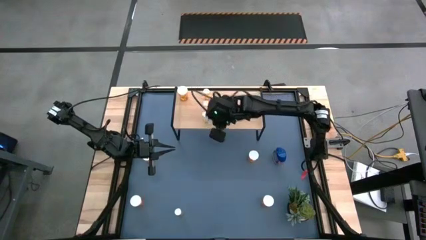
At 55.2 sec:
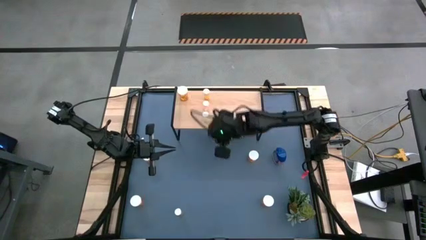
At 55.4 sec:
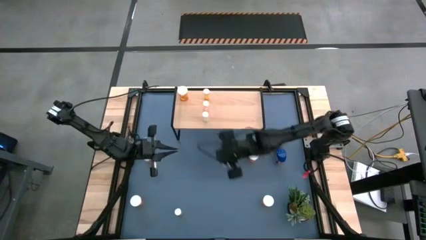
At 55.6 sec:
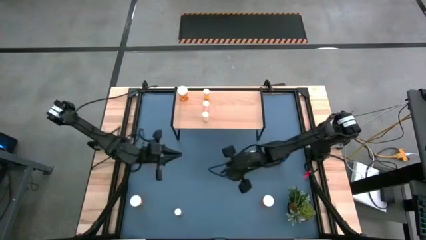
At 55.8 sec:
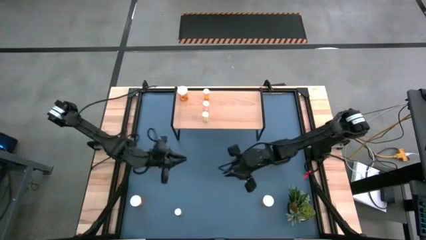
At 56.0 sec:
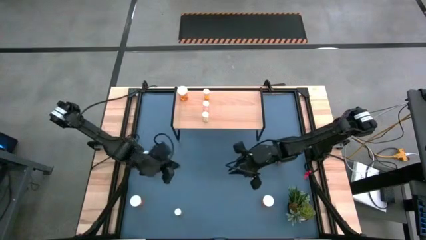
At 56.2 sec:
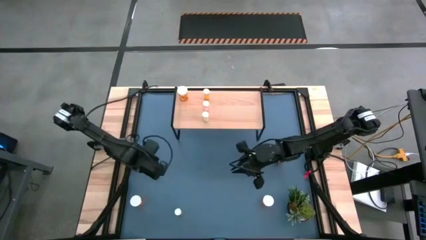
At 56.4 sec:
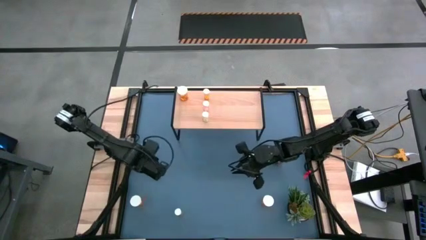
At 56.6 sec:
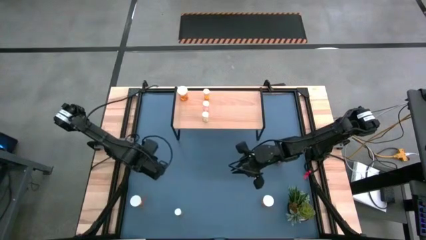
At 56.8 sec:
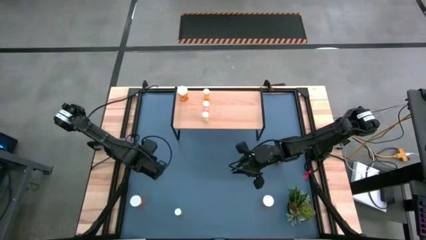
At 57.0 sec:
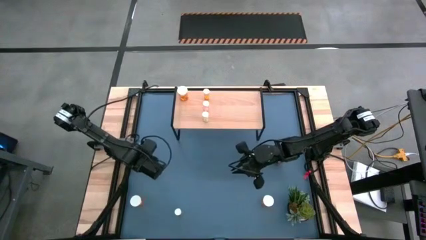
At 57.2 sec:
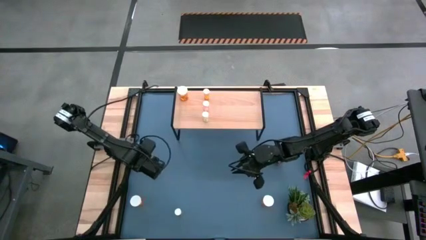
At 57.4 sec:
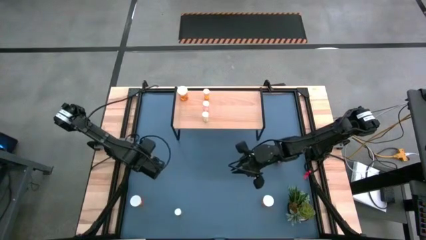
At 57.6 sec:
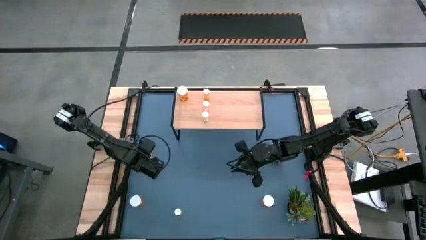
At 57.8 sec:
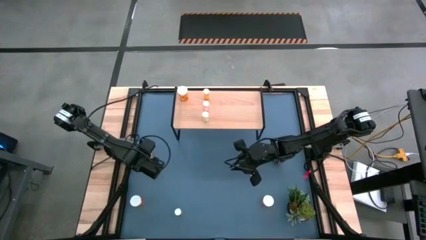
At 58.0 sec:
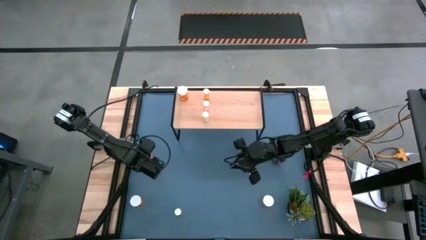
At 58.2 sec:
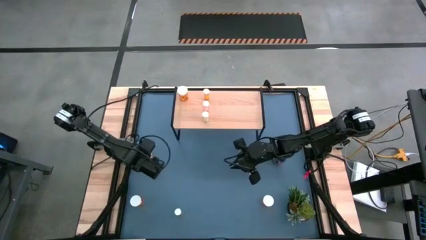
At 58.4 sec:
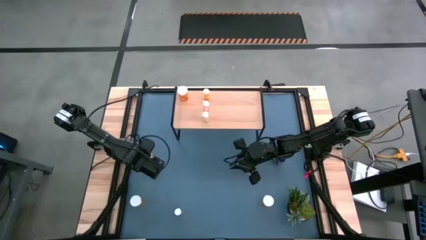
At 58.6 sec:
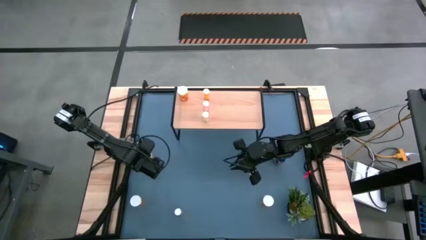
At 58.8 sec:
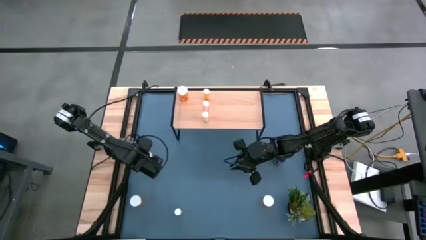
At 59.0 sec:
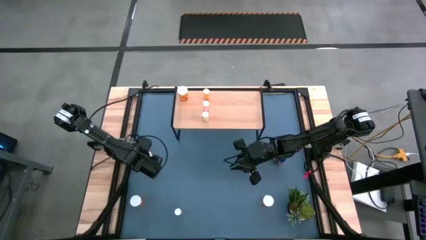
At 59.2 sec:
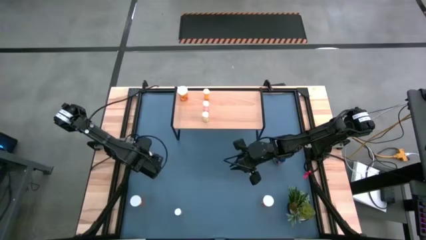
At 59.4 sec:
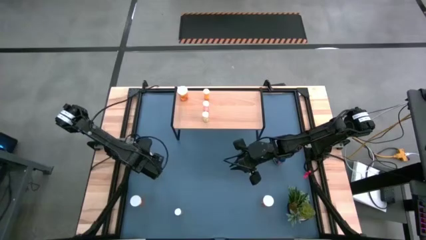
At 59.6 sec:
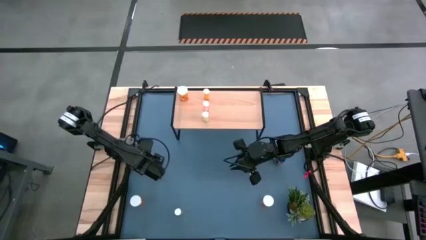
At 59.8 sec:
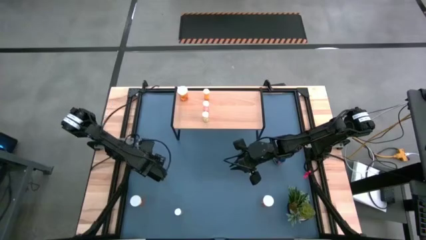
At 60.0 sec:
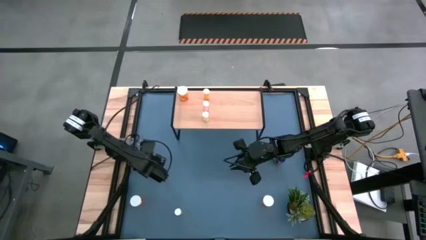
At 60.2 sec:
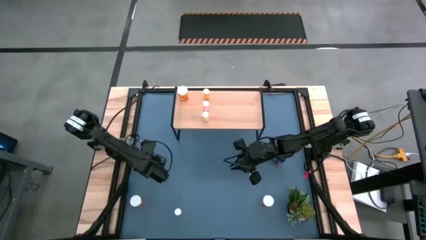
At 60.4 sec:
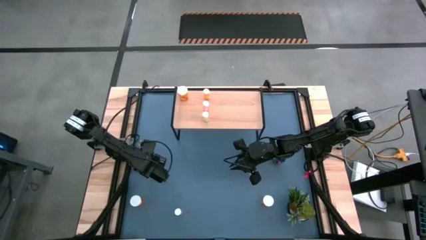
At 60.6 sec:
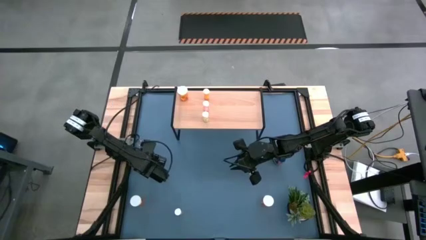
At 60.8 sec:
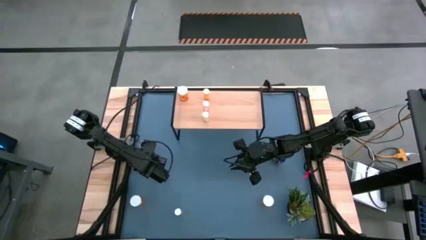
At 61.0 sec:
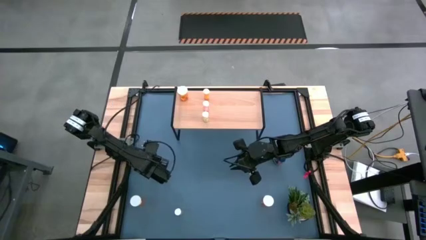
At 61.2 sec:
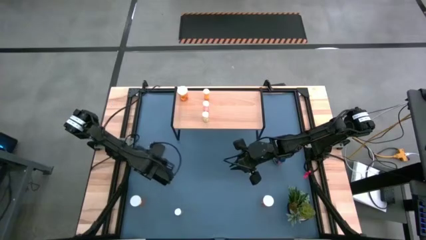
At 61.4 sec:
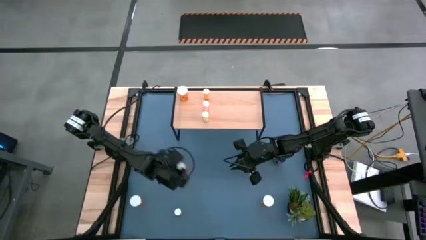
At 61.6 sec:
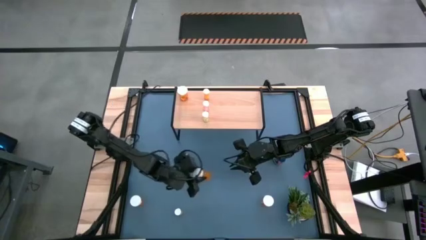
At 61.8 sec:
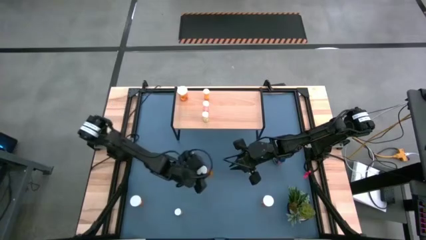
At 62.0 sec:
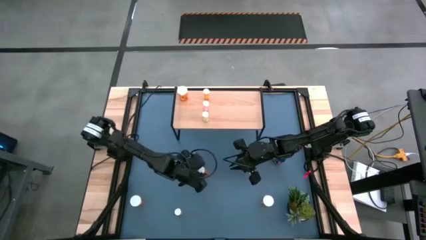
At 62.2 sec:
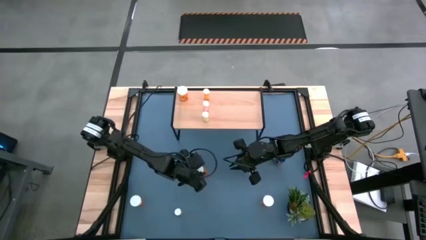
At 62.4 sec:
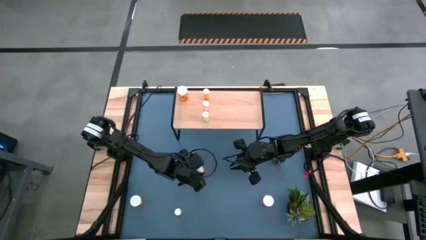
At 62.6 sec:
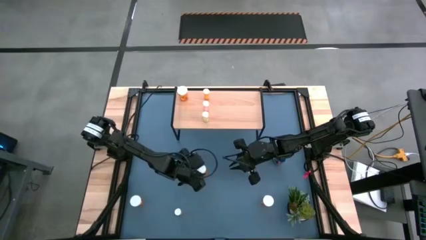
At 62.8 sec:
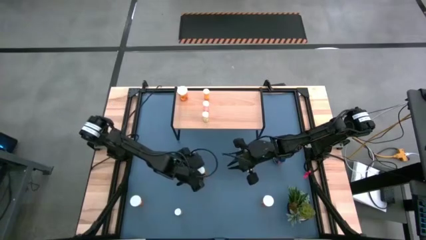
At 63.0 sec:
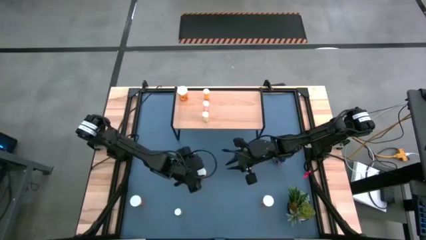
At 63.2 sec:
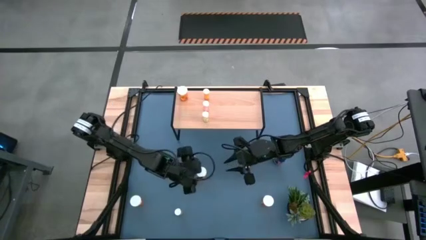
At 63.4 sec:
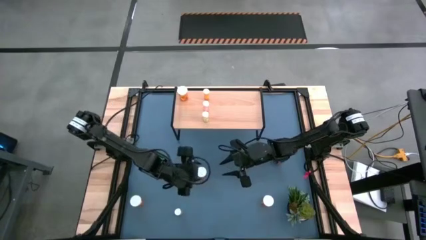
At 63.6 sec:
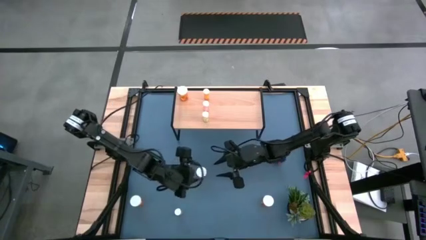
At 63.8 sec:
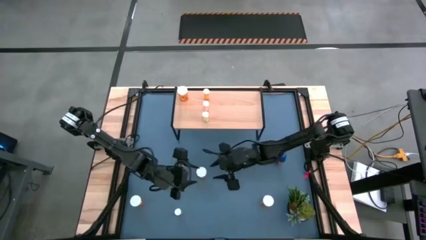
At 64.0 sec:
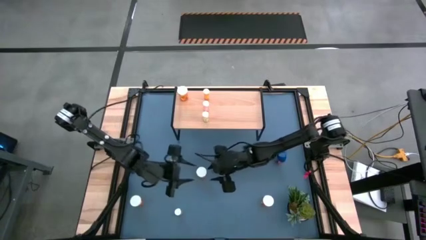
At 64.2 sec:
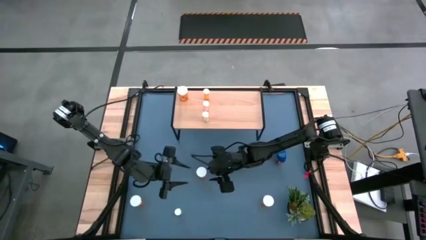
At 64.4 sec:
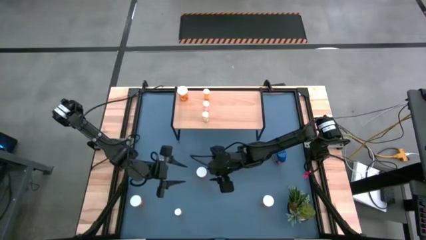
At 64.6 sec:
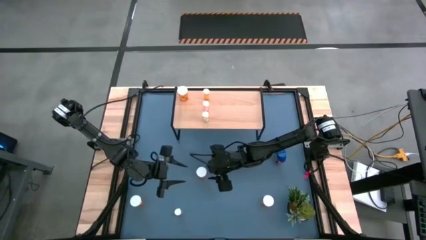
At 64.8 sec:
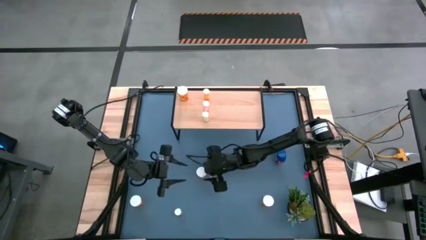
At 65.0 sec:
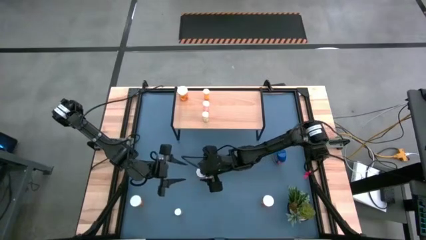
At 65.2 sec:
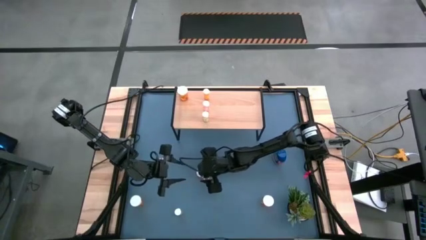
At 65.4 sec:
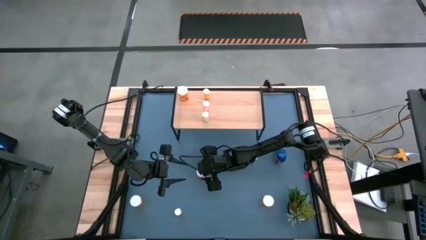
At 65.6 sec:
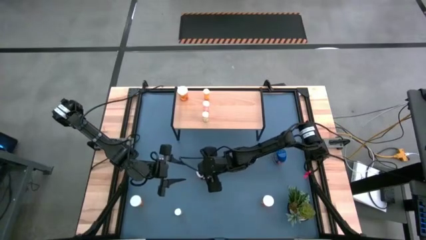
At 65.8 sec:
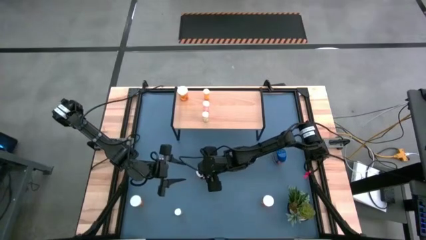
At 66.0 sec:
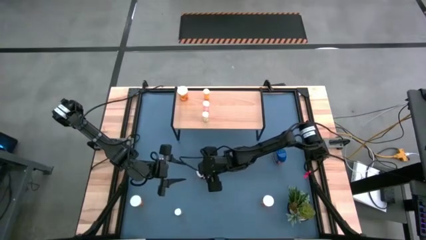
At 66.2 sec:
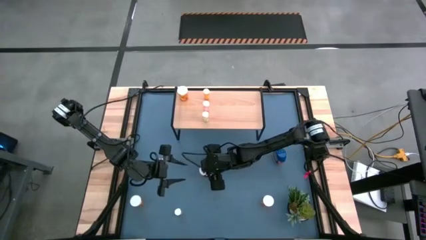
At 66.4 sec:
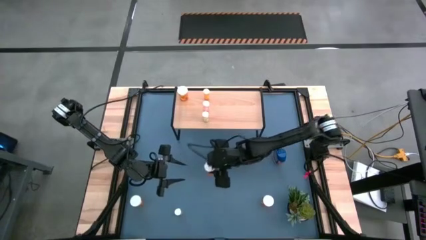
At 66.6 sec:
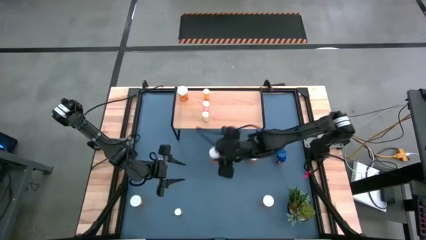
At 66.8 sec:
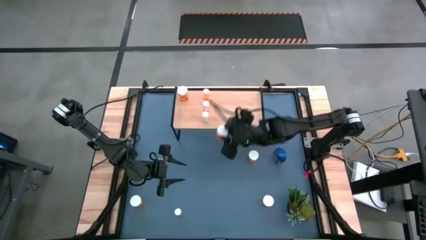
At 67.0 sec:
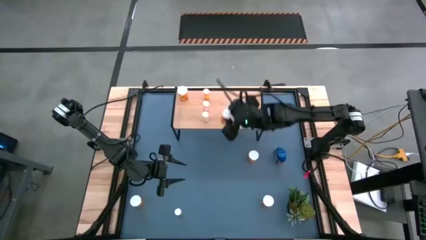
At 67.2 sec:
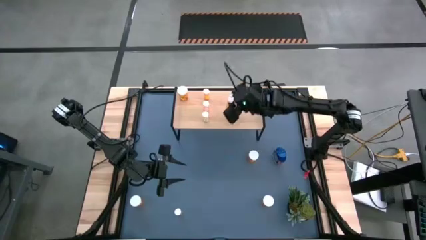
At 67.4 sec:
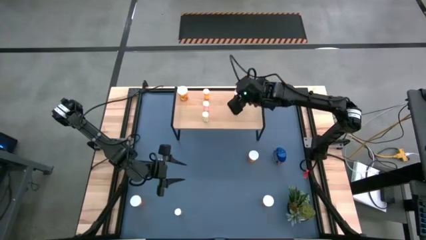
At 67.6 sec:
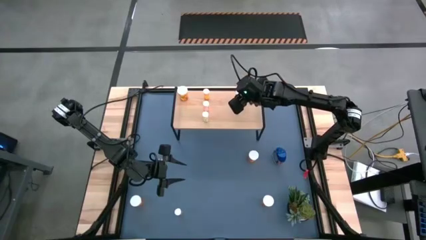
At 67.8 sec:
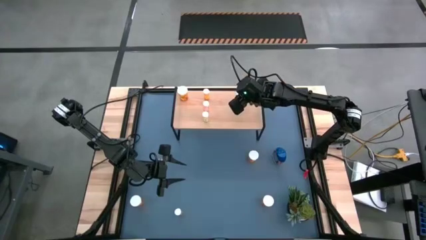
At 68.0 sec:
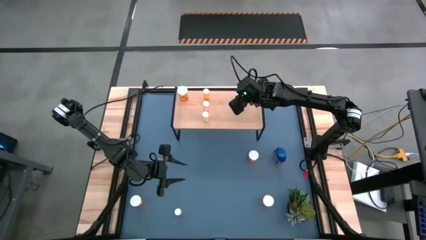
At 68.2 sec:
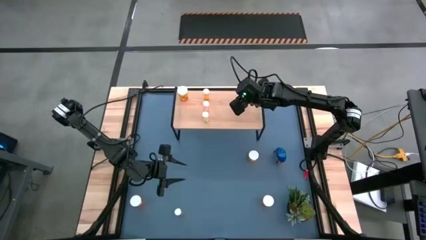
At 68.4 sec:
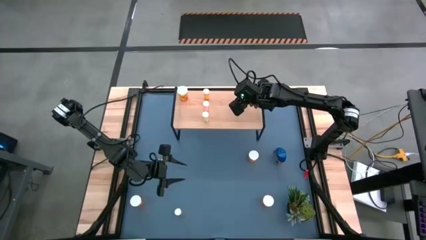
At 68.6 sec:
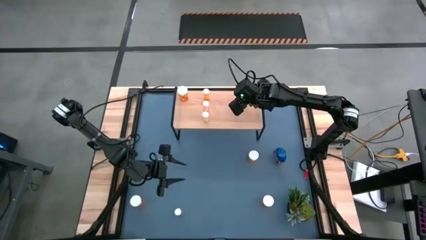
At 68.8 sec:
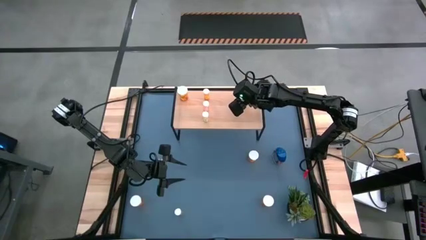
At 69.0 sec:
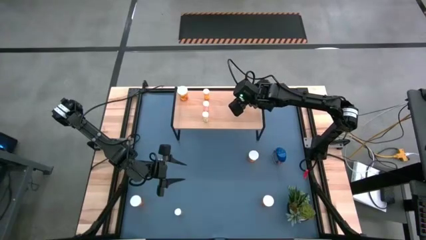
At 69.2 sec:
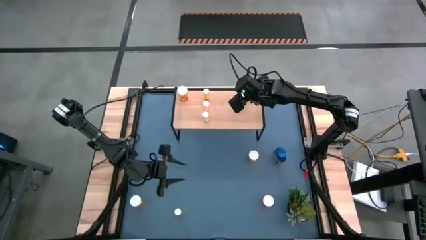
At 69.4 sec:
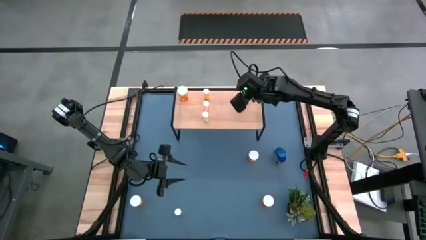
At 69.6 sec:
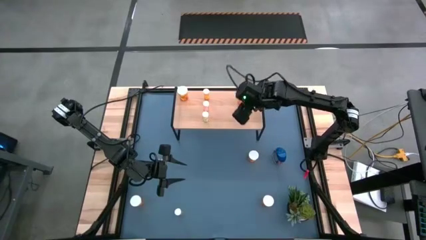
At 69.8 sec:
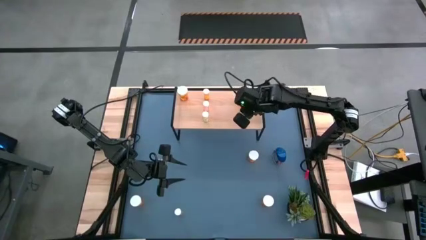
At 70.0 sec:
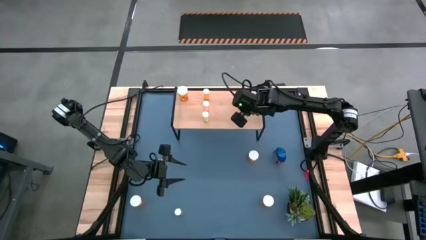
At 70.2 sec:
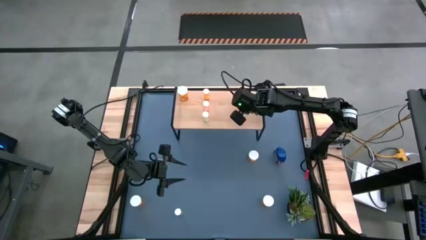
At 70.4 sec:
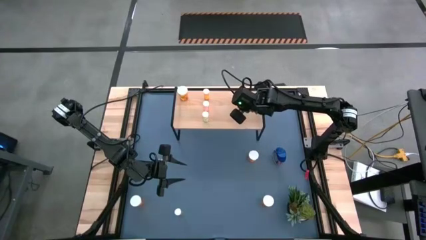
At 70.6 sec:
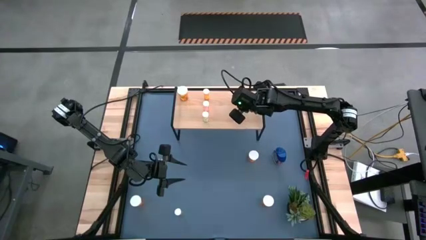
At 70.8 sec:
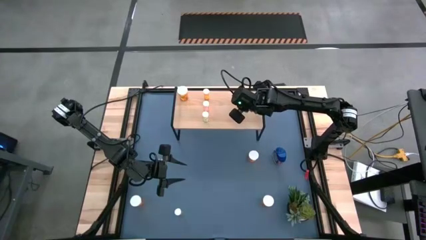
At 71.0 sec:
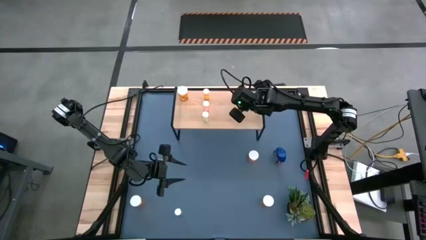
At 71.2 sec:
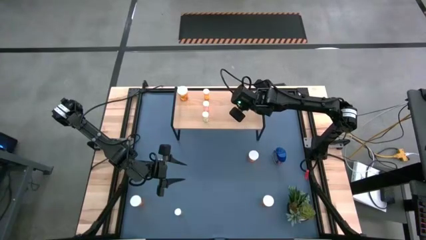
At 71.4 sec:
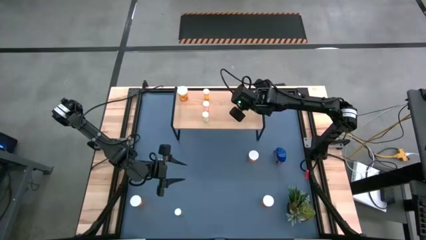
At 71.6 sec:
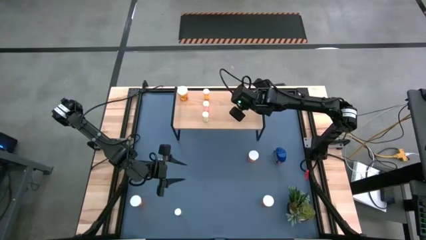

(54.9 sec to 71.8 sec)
Task: Pick and place medicine bottles onto shelf by color
Put the large orange pill bottle on the shelf
